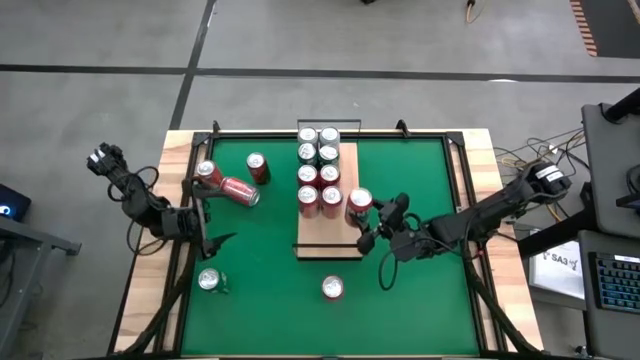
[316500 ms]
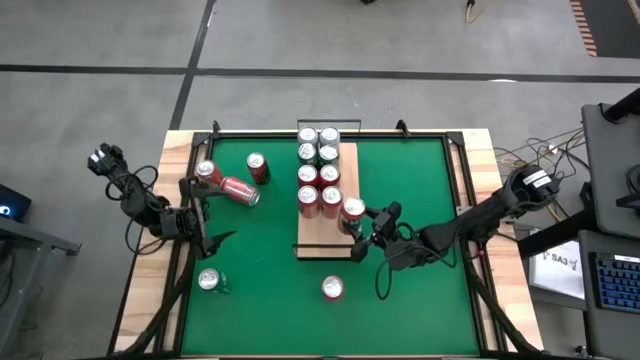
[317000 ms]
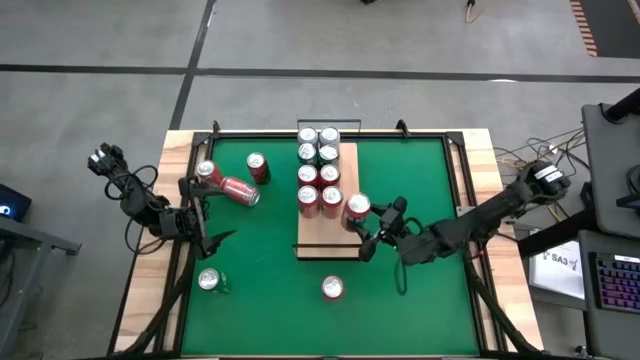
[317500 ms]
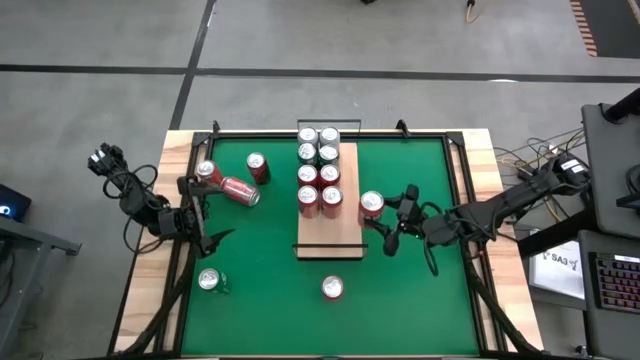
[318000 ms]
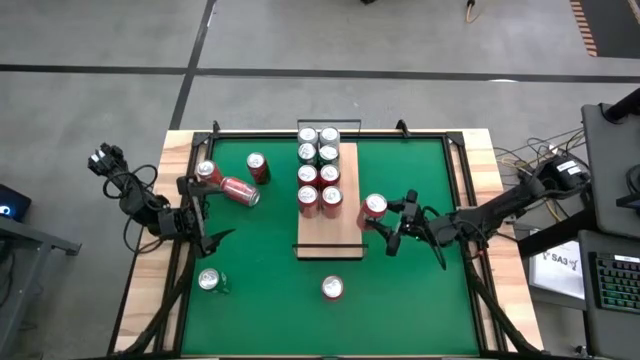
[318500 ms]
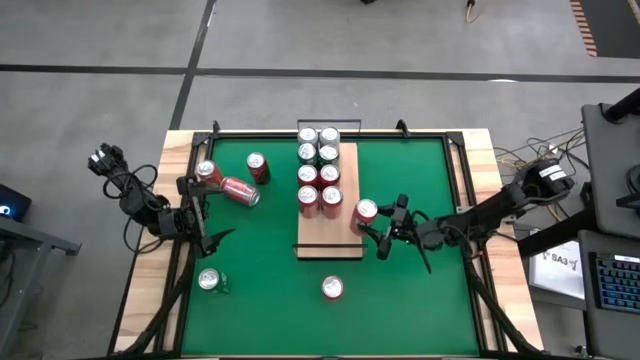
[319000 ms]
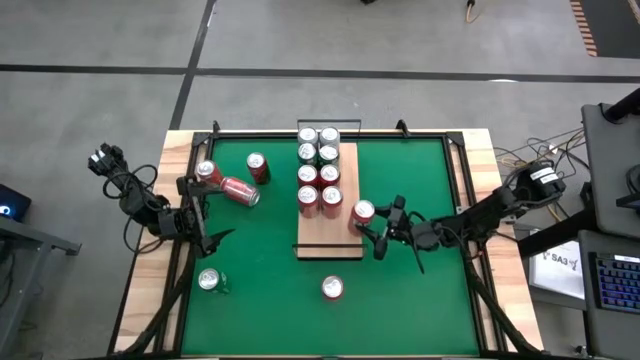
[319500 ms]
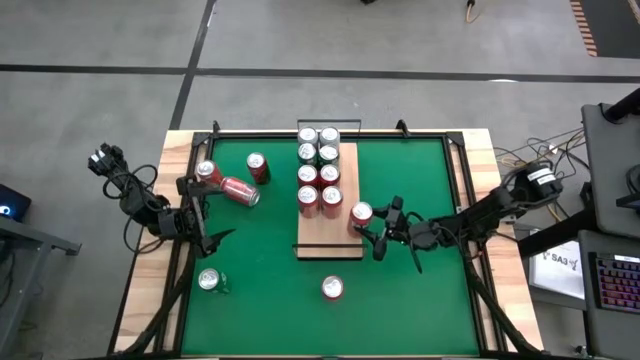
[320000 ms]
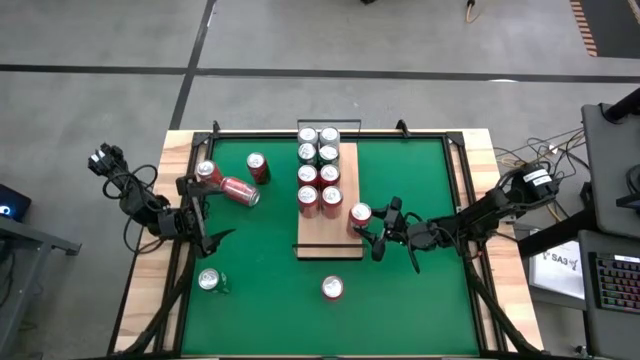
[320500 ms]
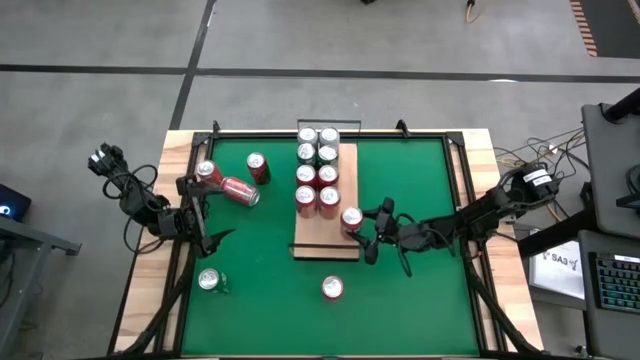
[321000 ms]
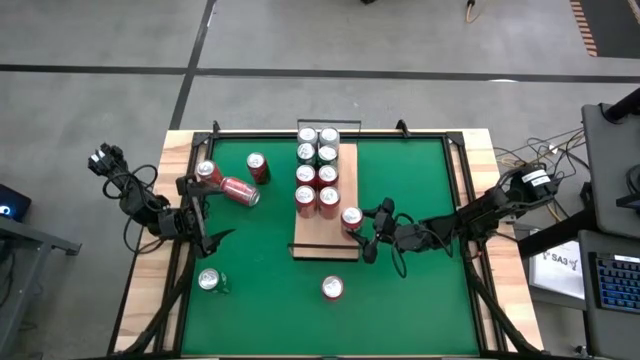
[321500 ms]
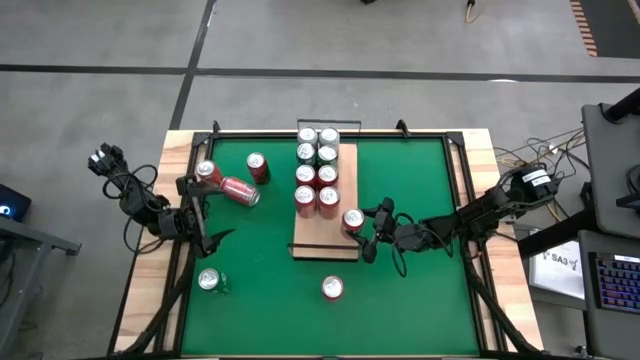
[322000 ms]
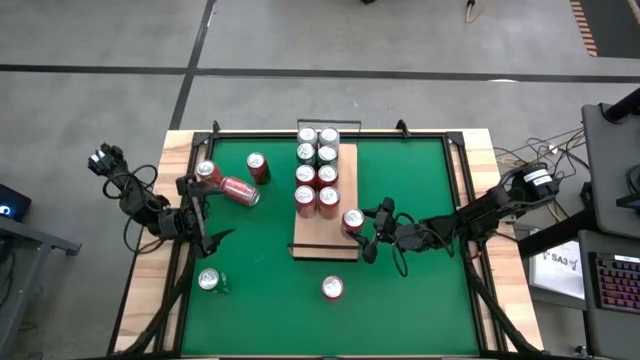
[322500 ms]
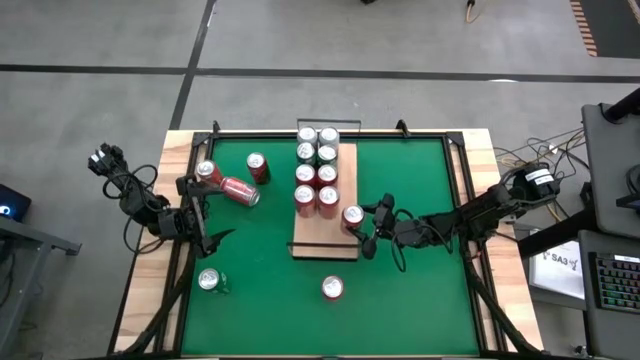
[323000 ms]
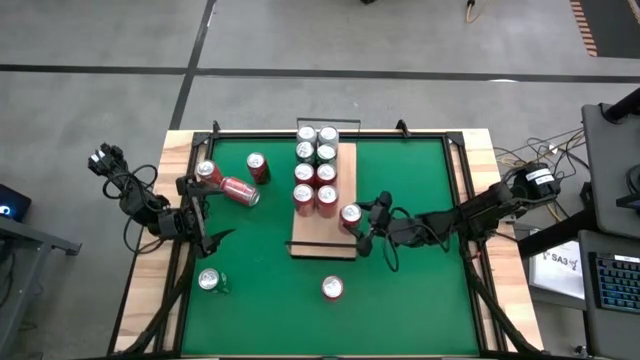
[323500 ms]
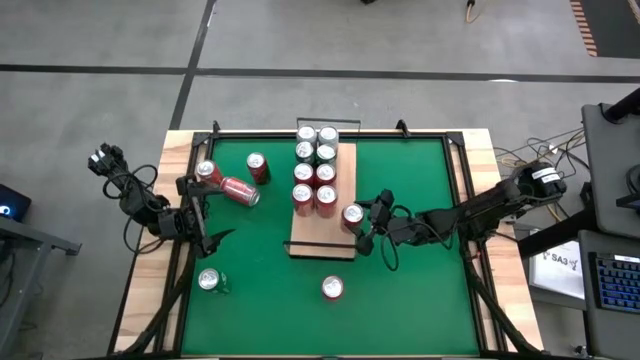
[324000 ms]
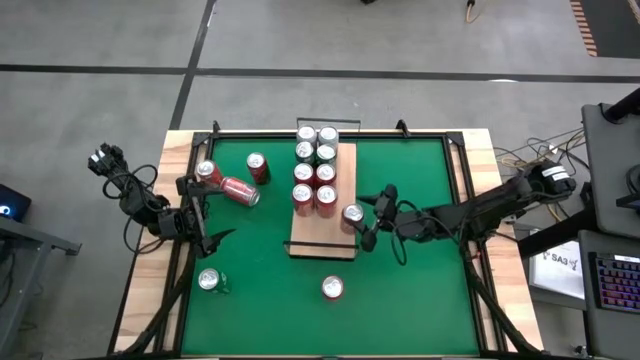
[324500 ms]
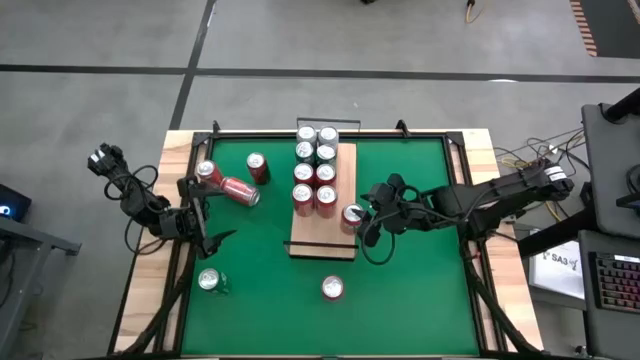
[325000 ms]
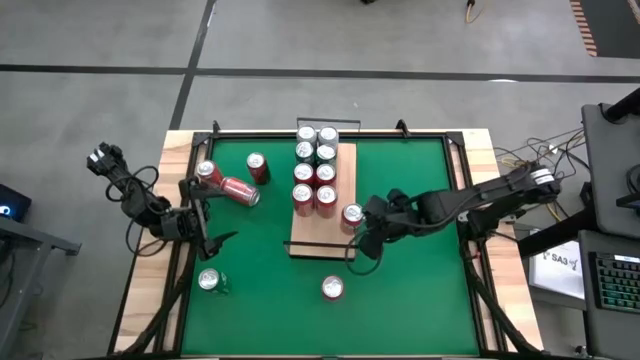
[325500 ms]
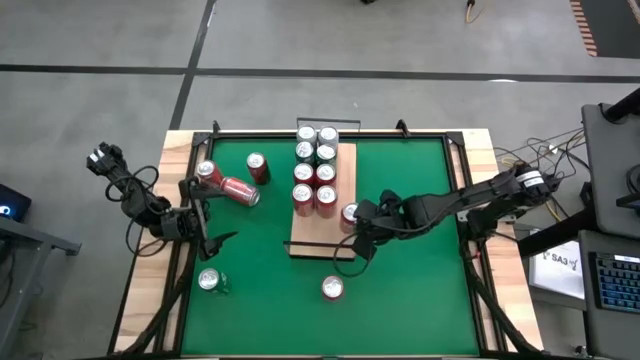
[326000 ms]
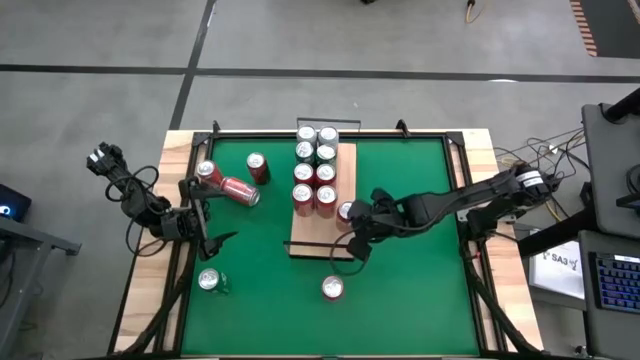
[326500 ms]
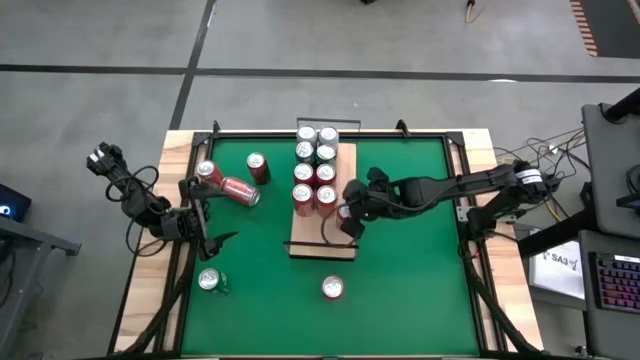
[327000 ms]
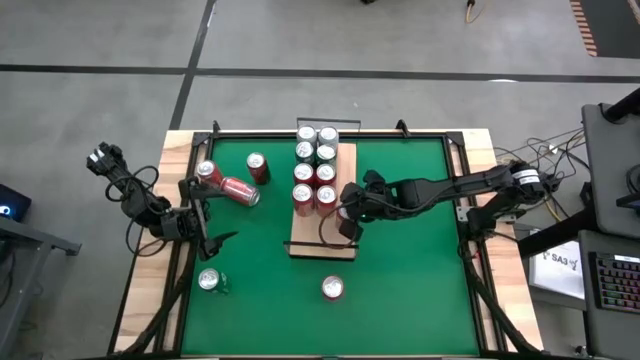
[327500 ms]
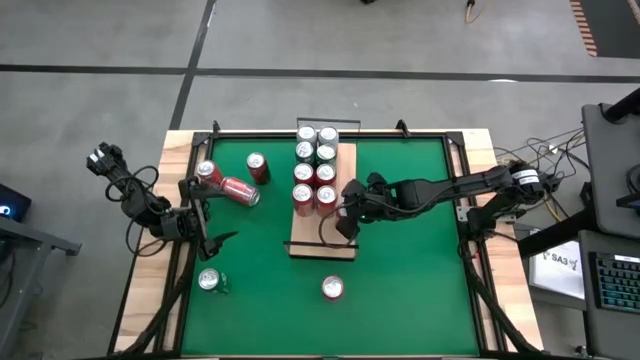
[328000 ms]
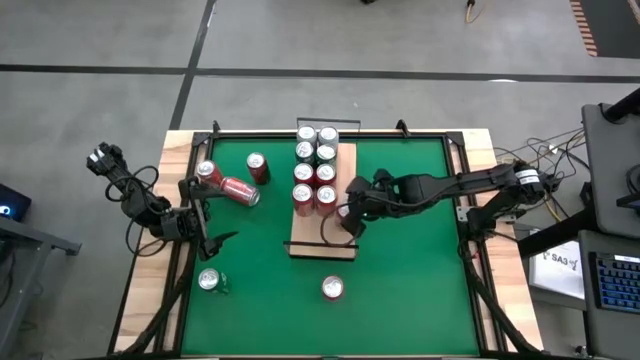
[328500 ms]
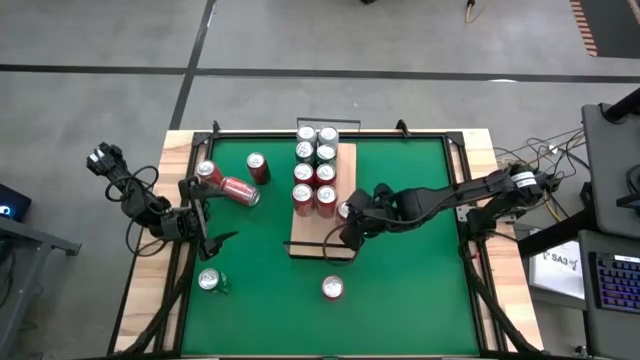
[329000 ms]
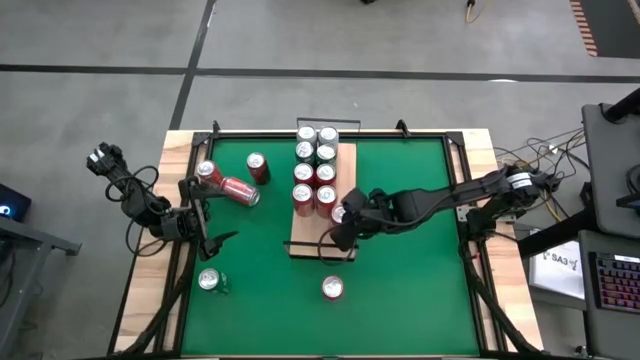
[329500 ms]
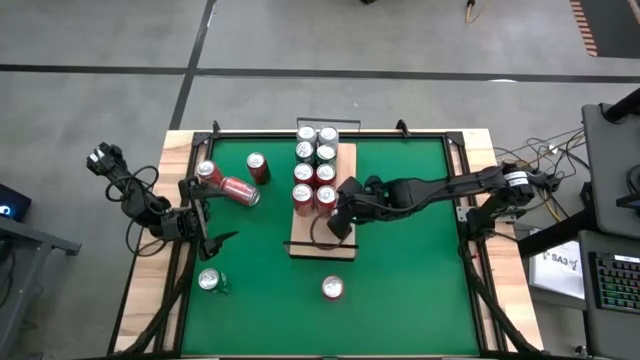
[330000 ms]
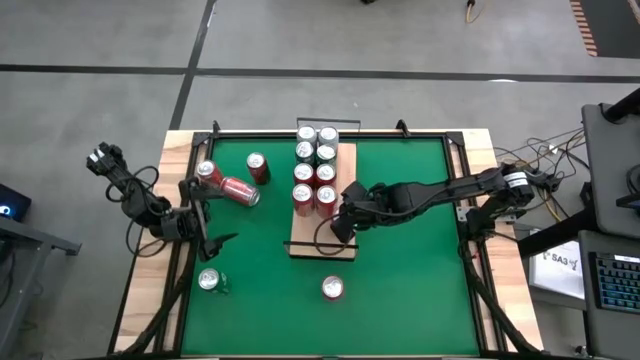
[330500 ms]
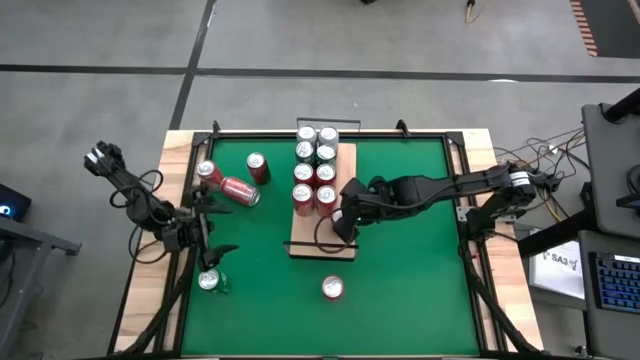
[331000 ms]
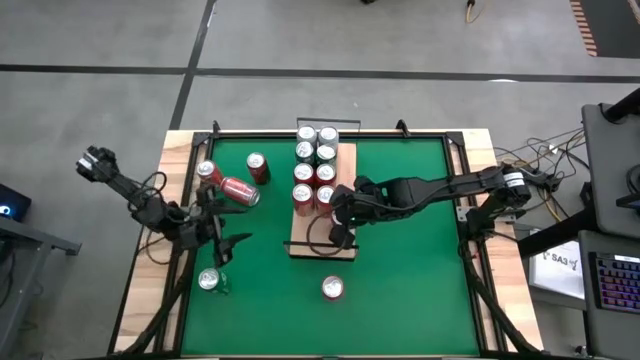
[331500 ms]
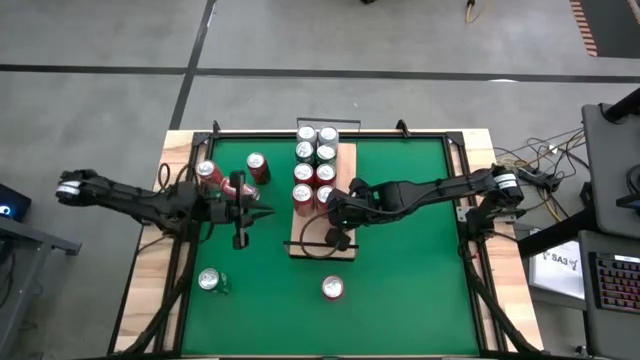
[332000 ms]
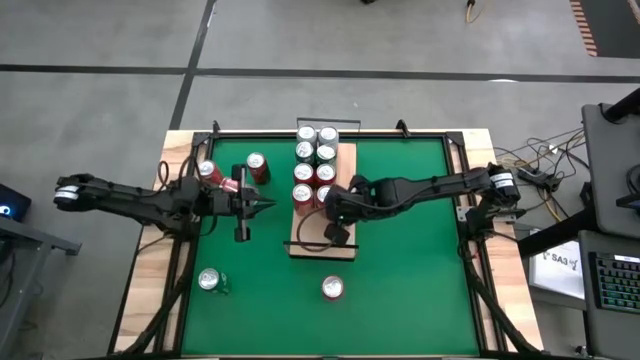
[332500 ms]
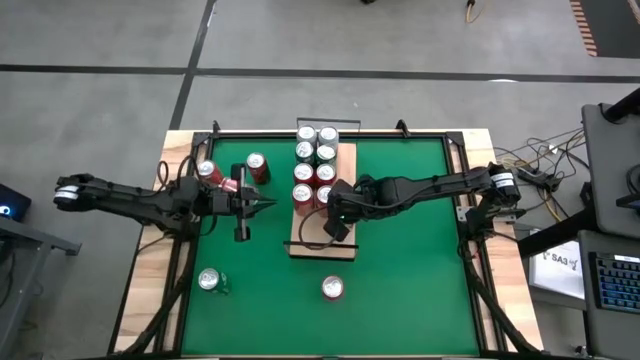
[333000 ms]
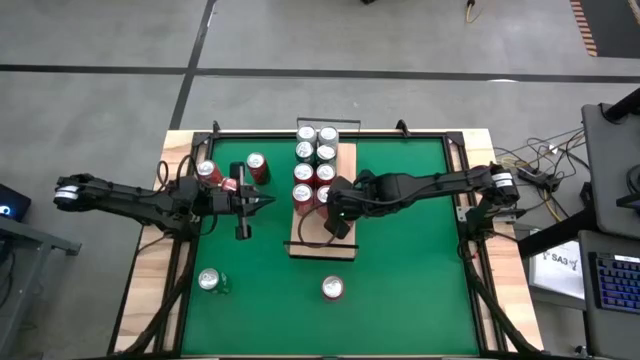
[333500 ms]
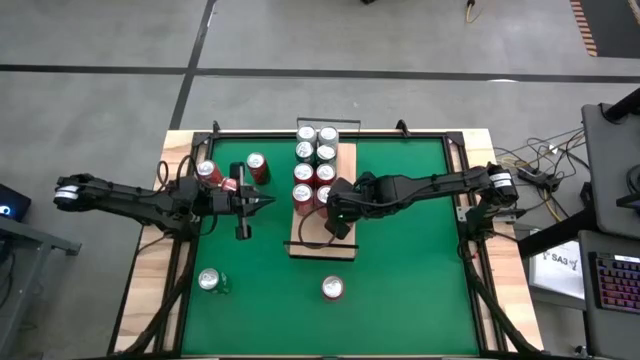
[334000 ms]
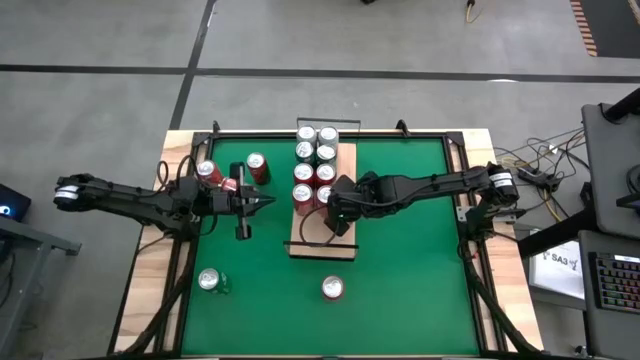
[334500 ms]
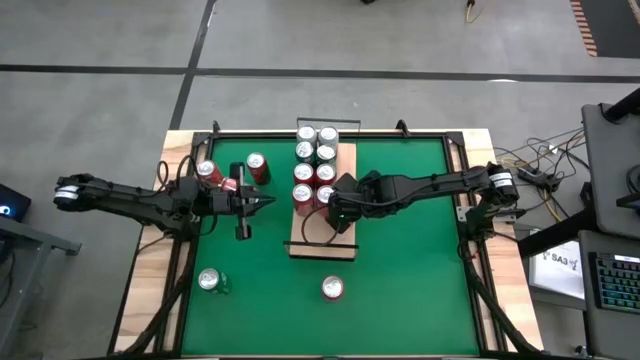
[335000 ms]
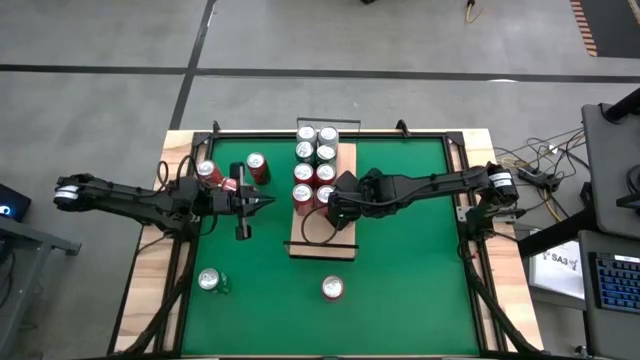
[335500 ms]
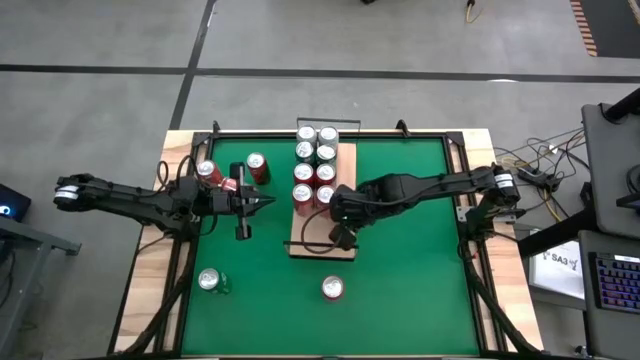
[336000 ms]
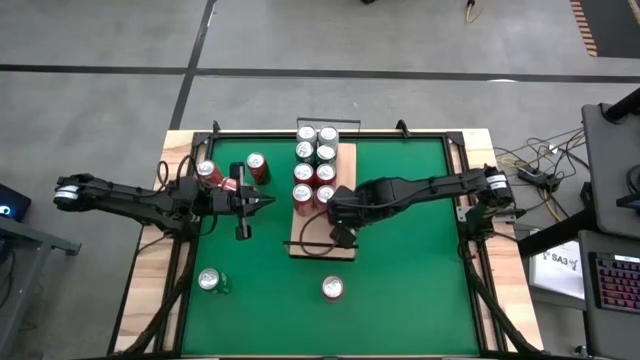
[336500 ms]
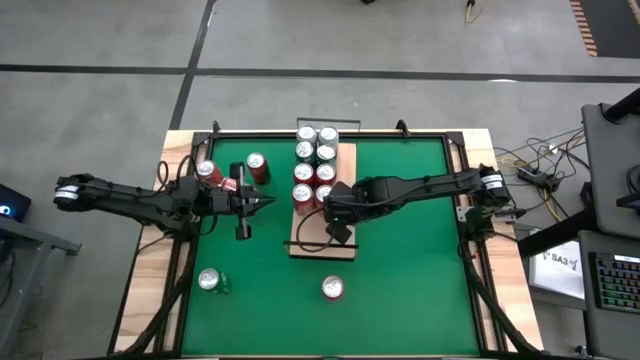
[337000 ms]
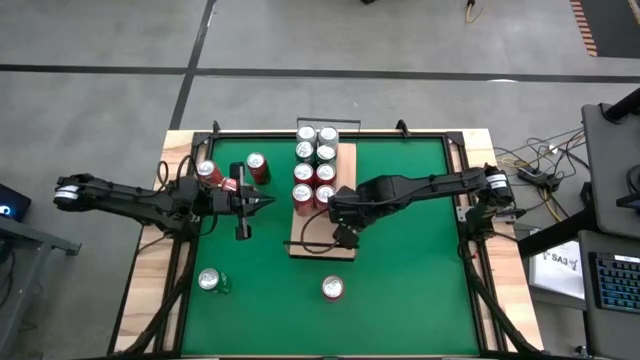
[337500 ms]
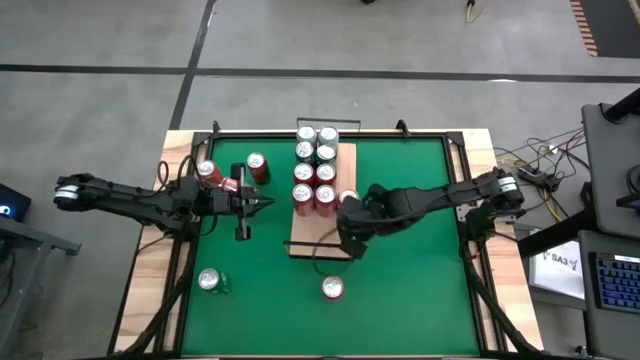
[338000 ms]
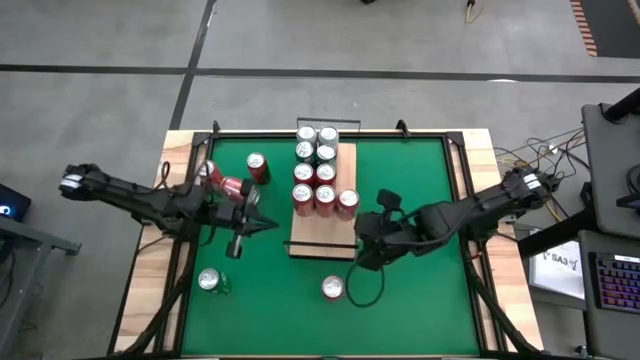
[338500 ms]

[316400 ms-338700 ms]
Task: Place canned beverage on shelf
Put the orange soda can on the shelf and aligned with the other orange soda can
